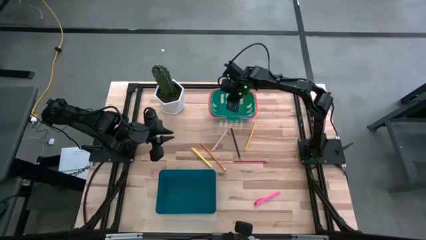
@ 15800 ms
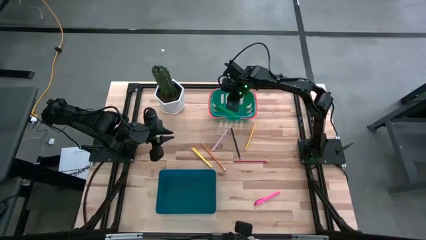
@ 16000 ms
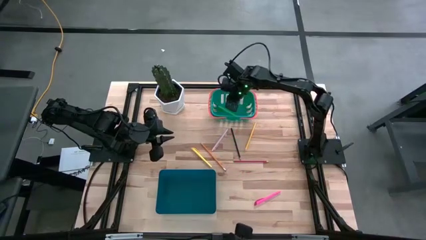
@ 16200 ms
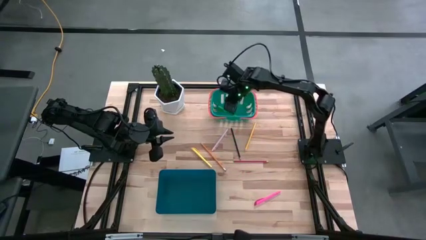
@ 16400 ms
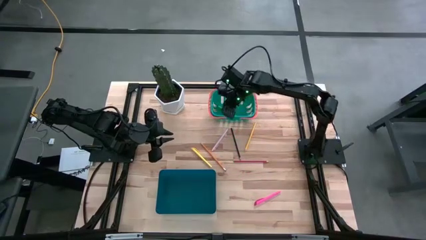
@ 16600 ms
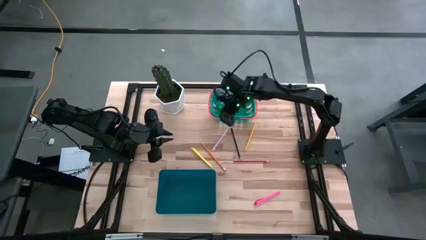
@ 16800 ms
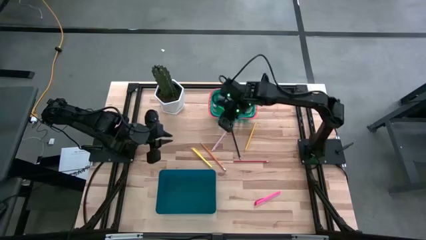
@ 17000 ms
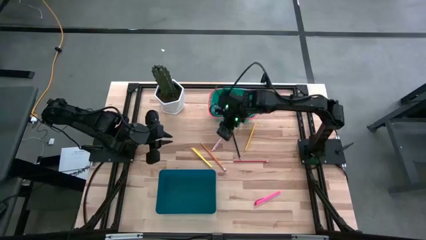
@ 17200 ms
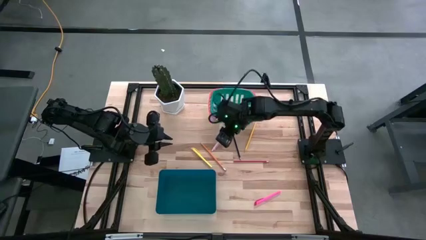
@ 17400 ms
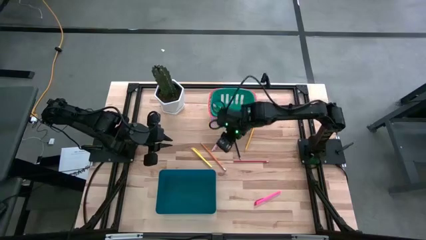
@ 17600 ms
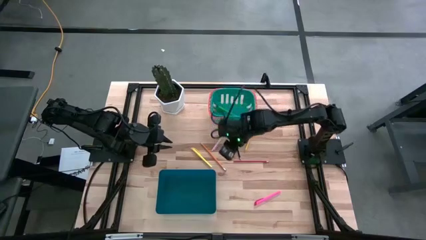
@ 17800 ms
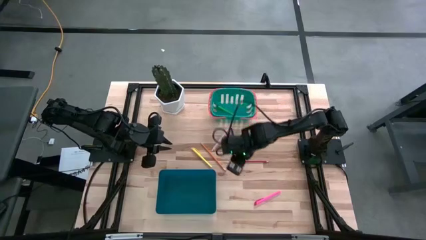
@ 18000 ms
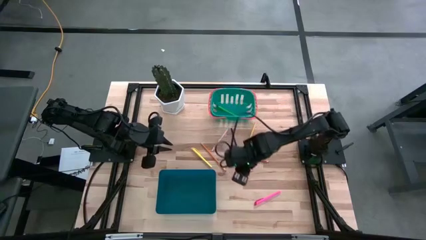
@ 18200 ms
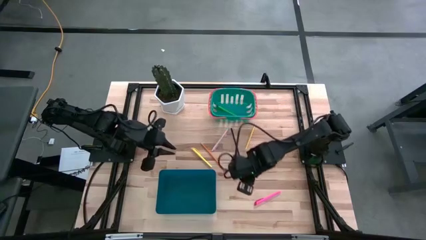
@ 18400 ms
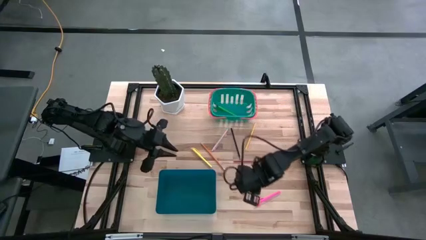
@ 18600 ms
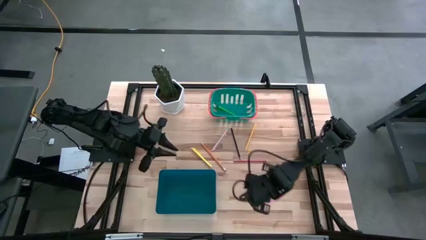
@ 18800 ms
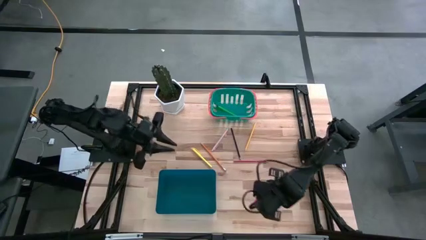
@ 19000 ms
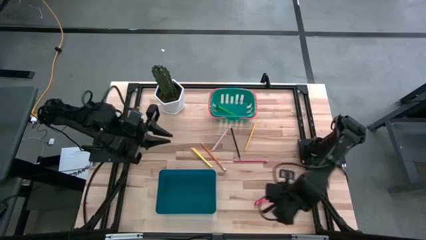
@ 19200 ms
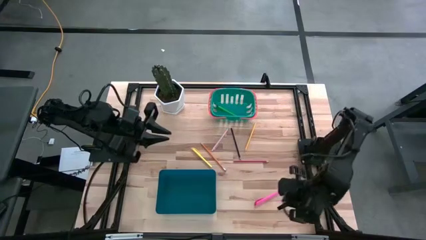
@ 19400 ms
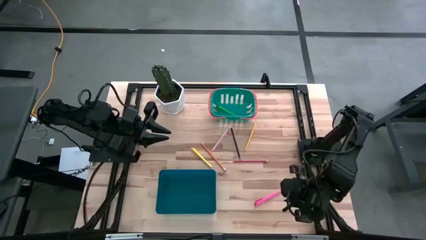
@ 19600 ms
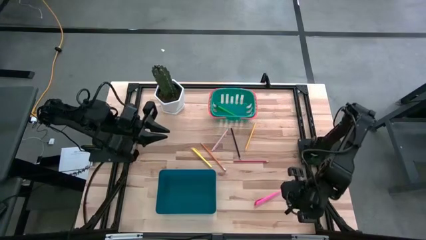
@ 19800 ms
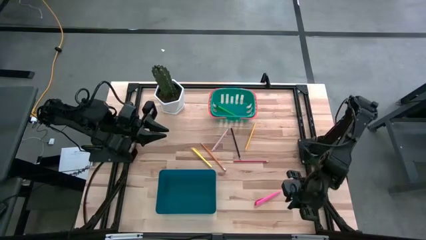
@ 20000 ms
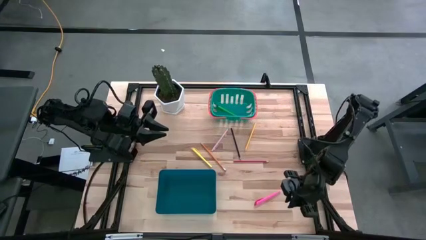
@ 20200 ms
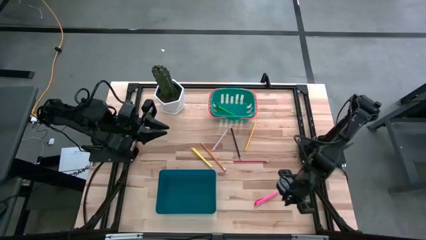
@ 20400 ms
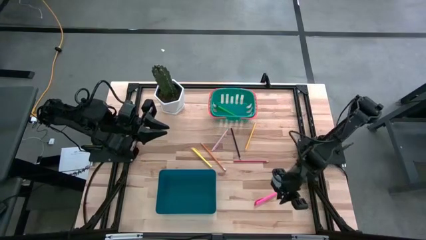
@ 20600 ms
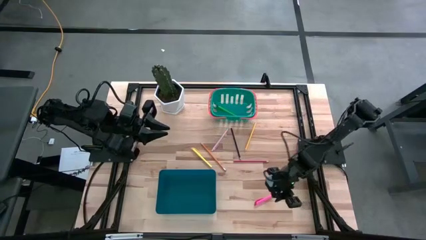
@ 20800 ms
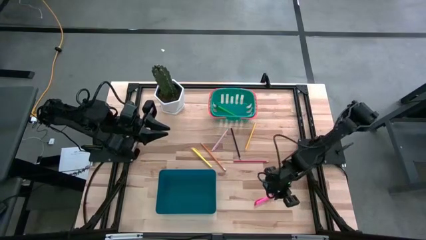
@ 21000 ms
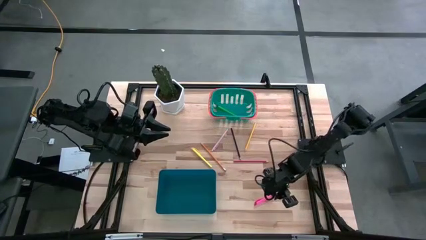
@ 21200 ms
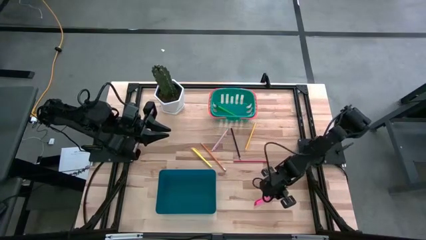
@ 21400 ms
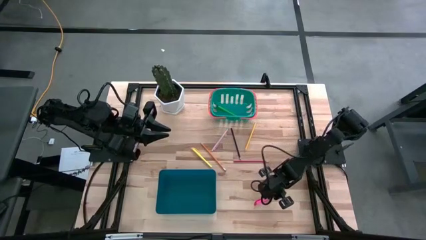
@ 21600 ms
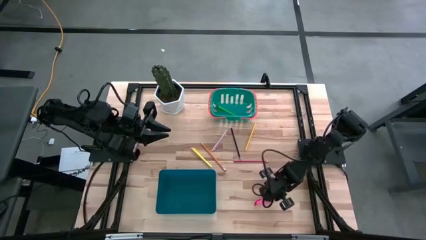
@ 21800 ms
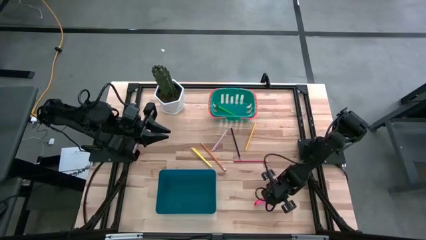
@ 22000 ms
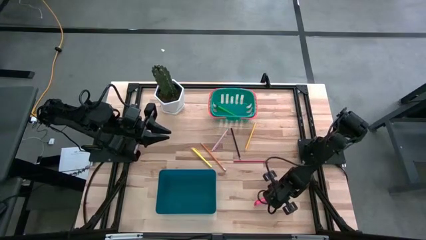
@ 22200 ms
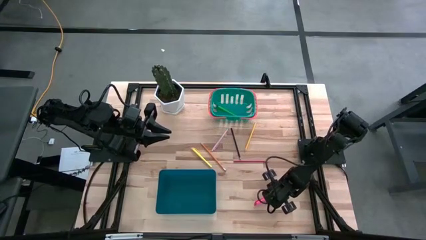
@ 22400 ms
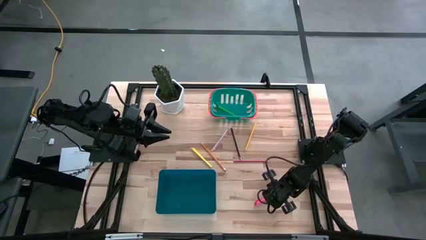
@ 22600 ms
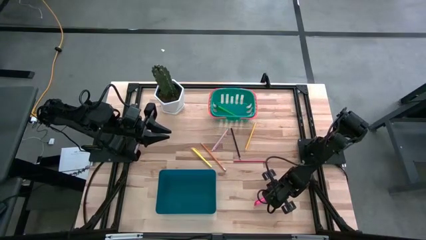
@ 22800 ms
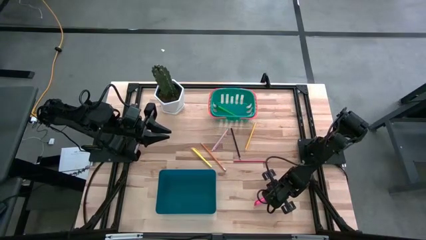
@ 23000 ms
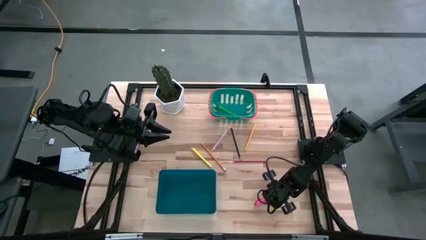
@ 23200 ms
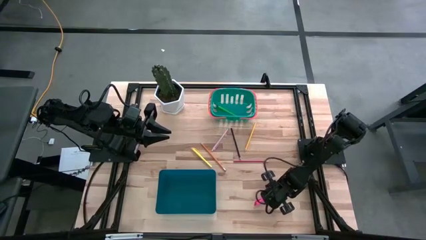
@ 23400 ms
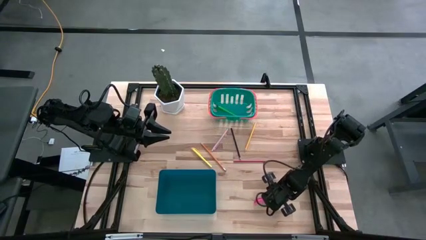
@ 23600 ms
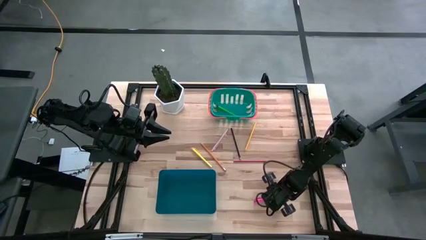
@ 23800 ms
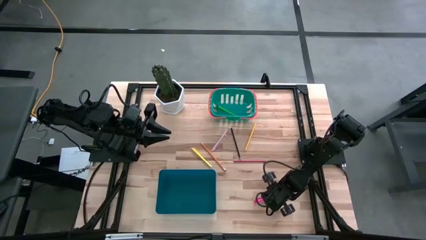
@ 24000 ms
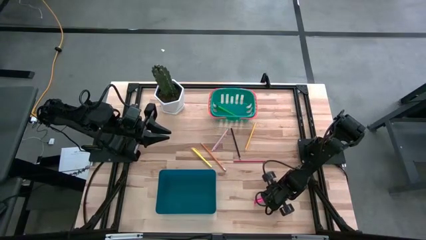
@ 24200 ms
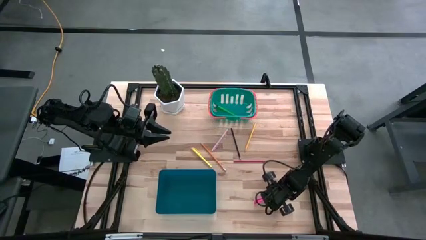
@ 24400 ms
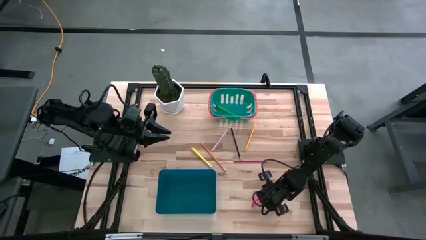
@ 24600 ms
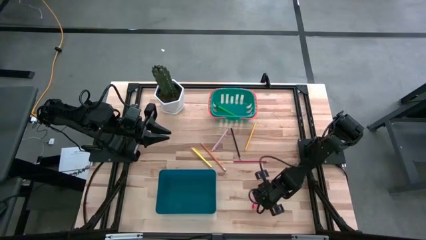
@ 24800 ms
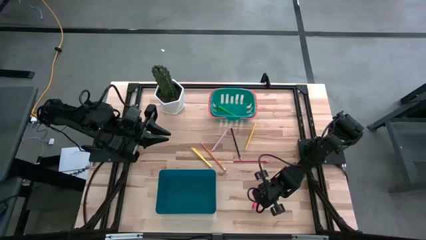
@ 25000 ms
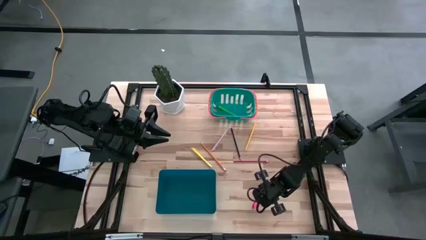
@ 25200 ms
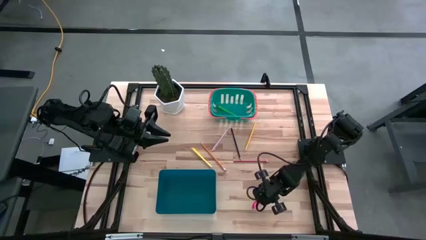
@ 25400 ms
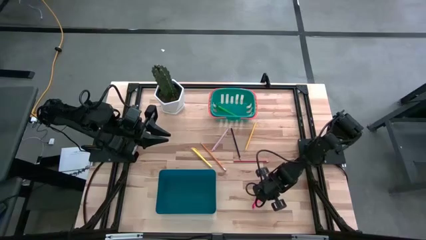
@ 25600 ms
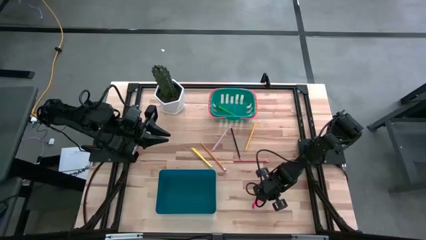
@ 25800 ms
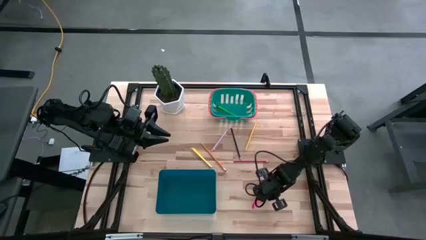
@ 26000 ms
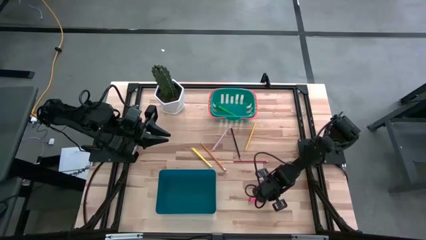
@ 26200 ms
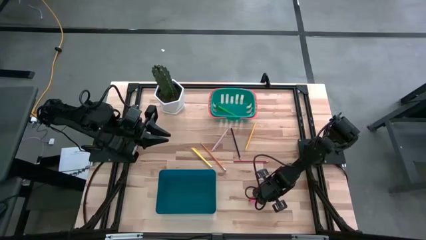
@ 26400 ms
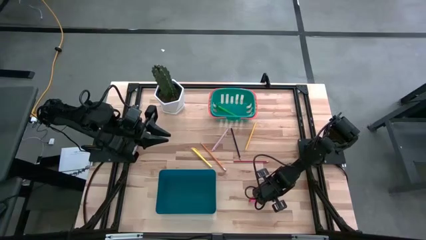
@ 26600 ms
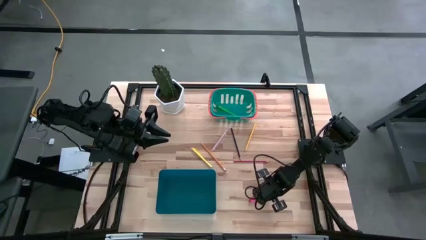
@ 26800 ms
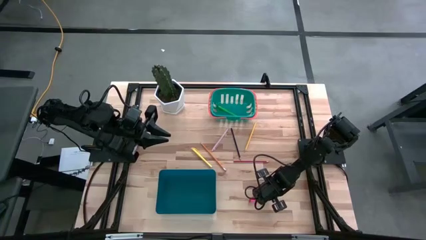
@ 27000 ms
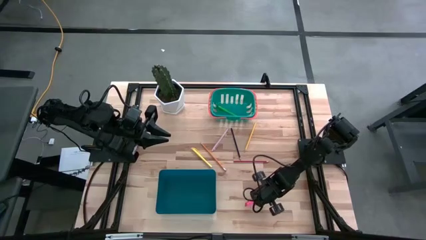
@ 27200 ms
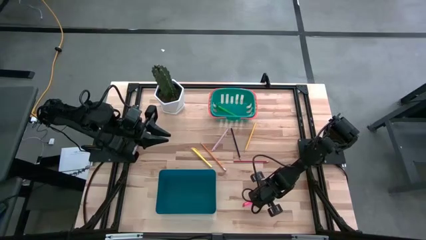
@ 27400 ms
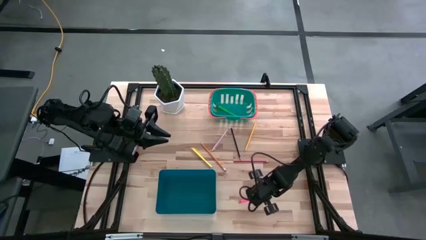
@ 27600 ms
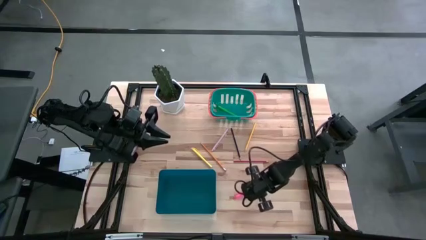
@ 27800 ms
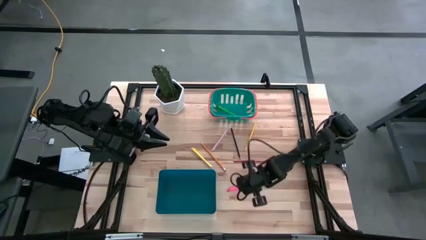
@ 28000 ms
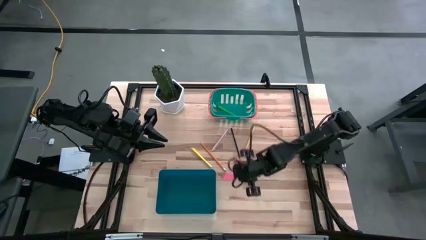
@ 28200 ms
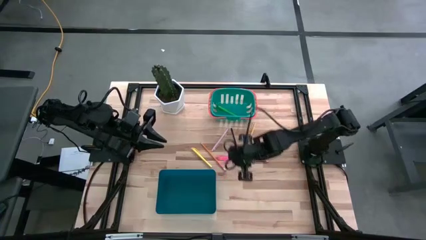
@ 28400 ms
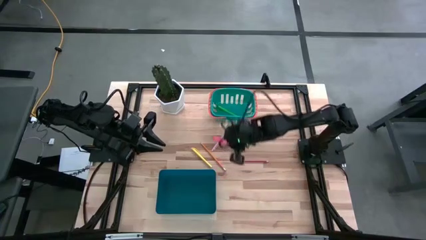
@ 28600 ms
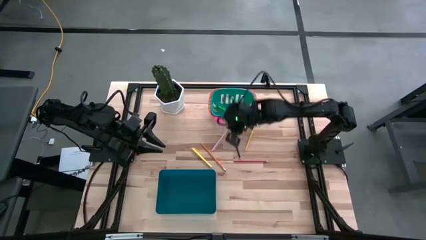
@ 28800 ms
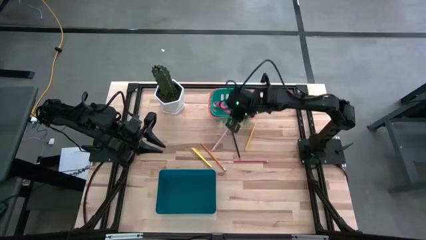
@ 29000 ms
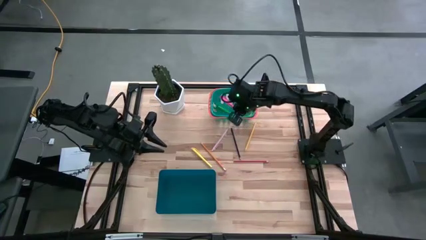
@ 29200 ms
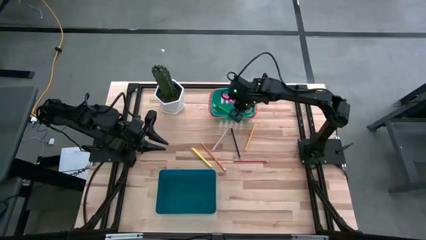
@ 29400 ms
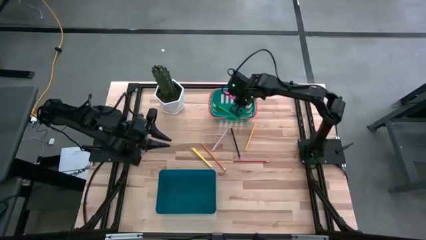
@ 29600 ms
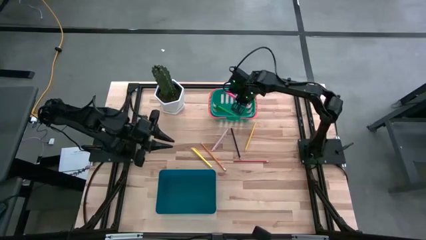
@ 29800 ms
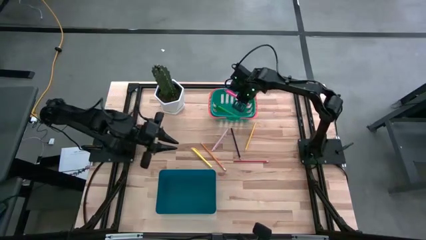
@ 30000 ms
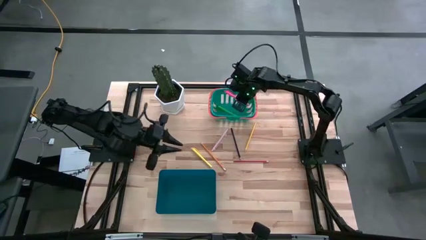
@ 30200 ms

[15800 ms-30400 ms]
Task: Sort pens & pencils
Put the pink pen into the green basket
